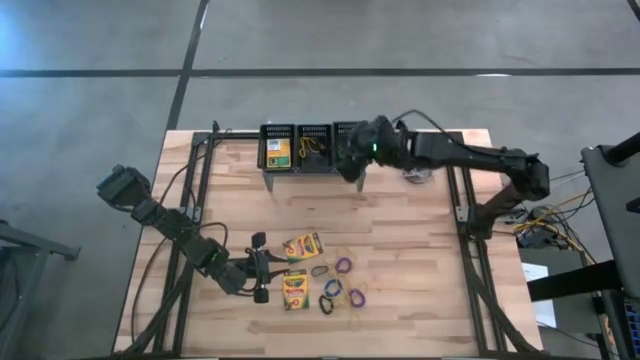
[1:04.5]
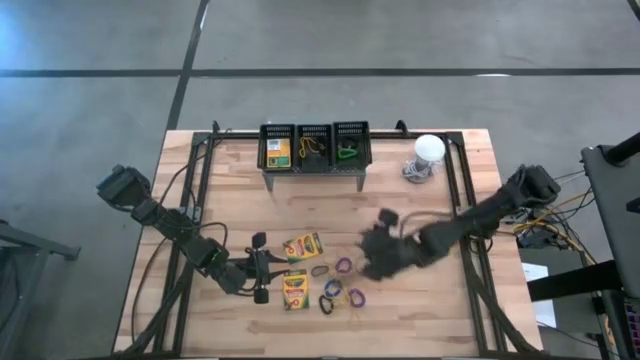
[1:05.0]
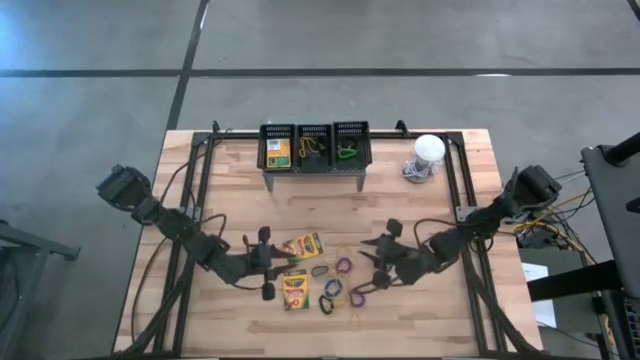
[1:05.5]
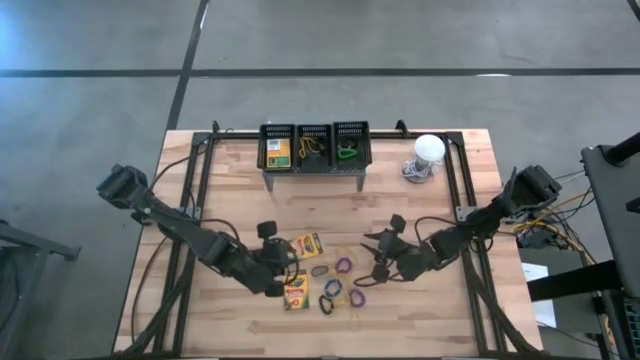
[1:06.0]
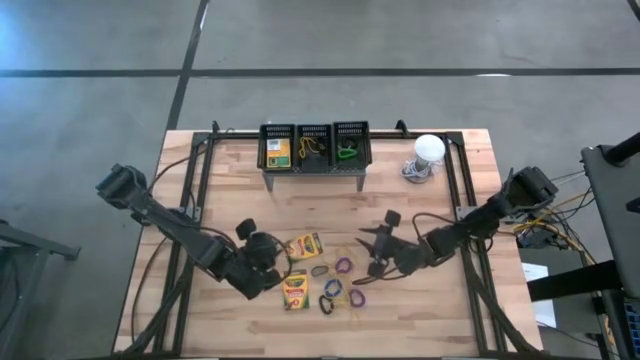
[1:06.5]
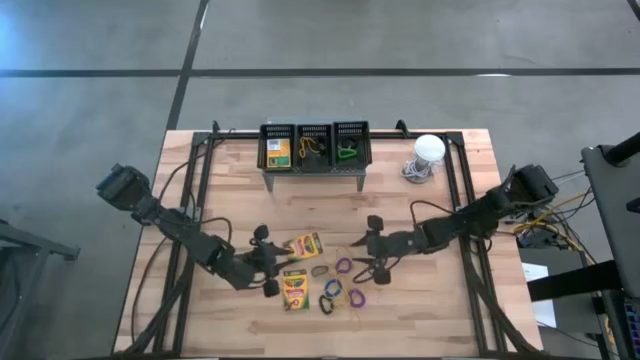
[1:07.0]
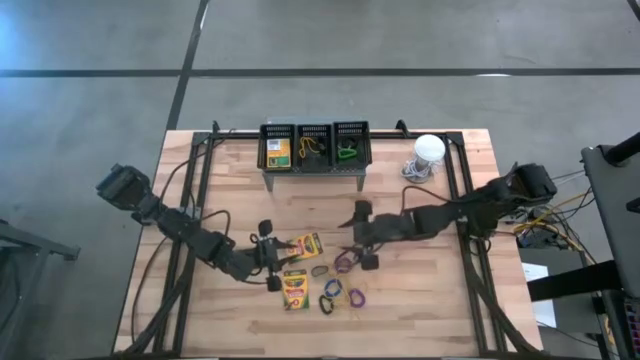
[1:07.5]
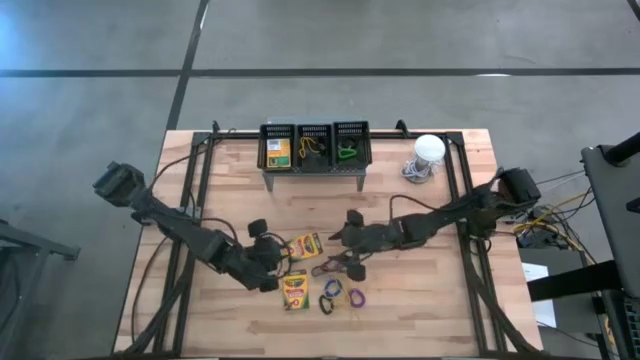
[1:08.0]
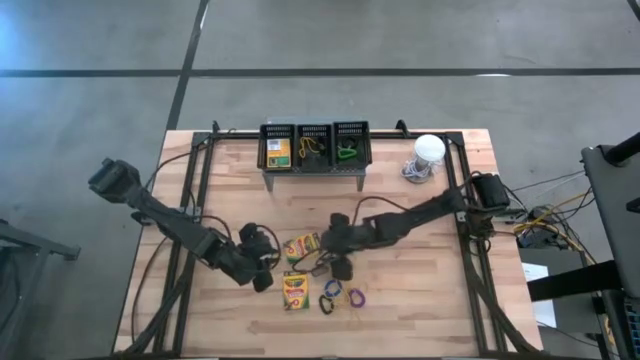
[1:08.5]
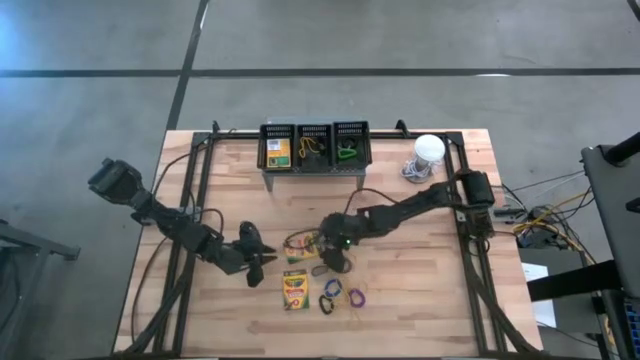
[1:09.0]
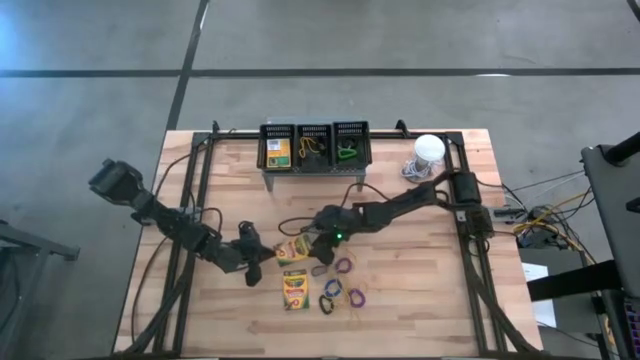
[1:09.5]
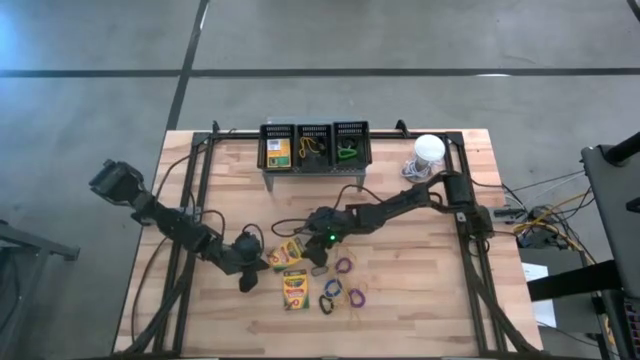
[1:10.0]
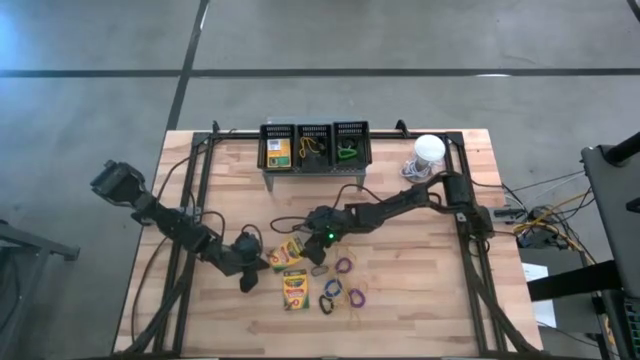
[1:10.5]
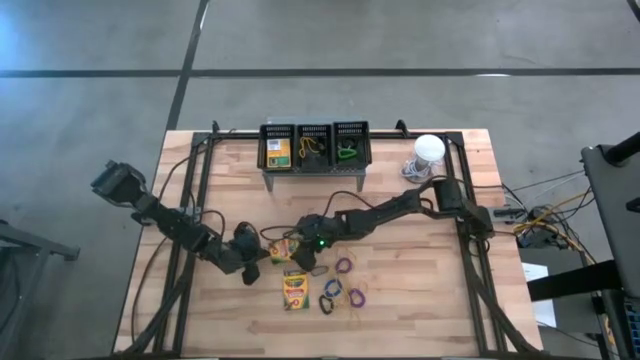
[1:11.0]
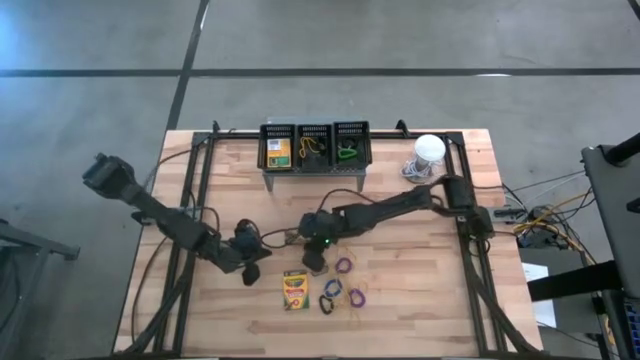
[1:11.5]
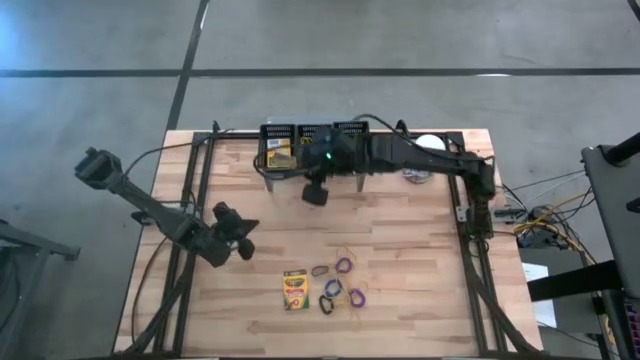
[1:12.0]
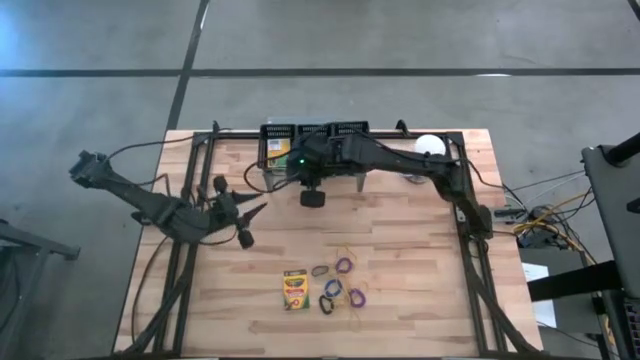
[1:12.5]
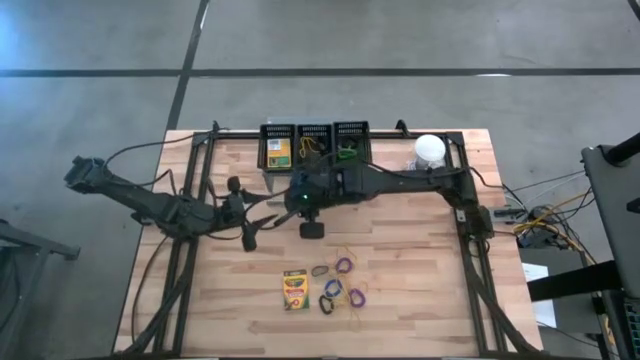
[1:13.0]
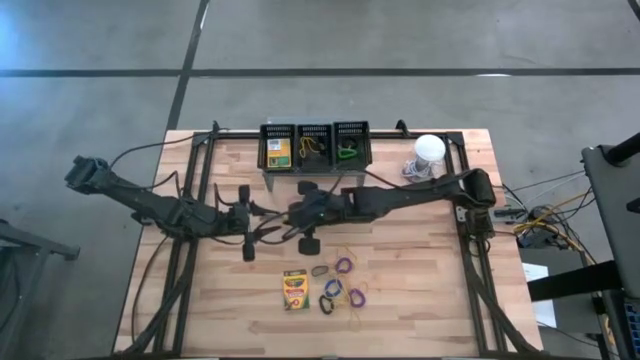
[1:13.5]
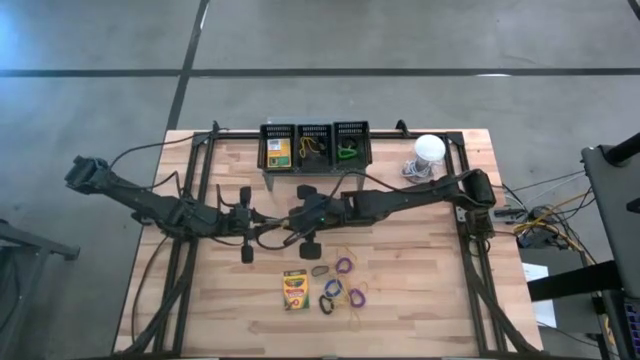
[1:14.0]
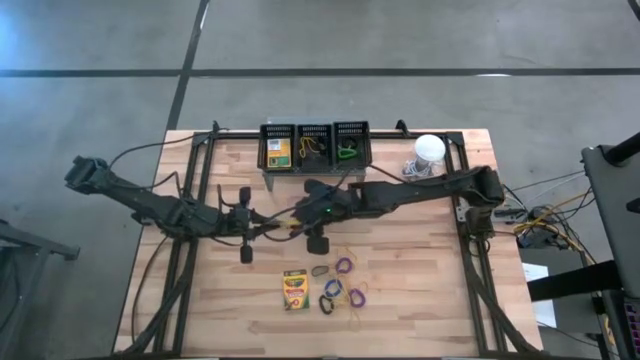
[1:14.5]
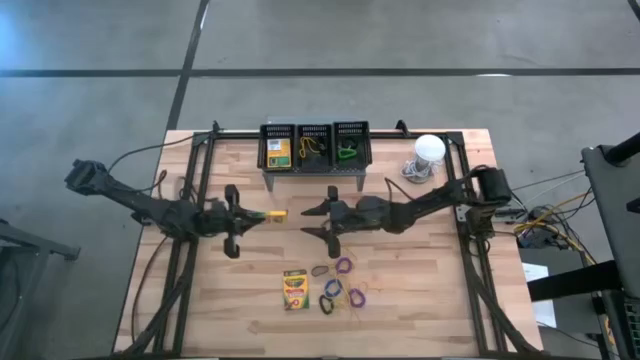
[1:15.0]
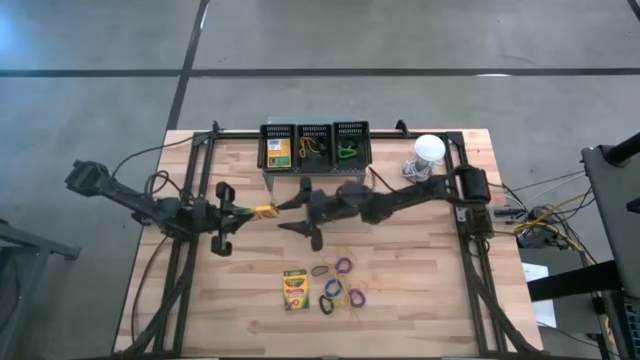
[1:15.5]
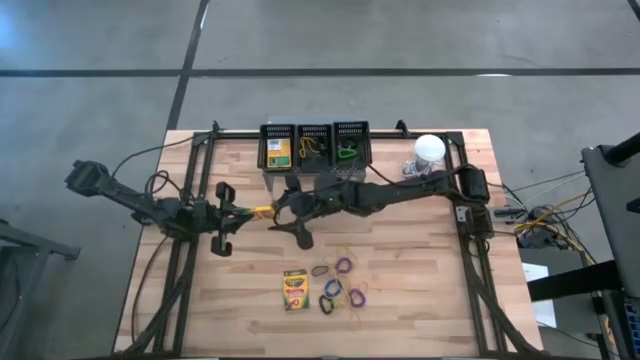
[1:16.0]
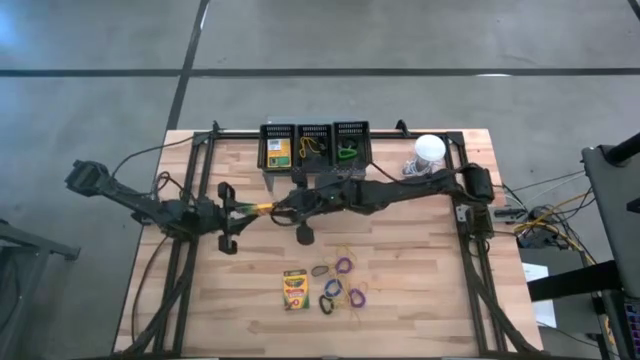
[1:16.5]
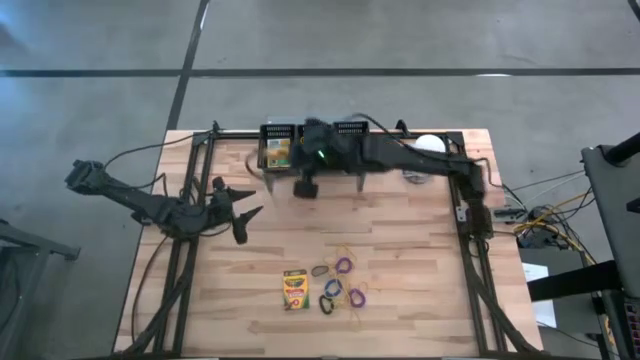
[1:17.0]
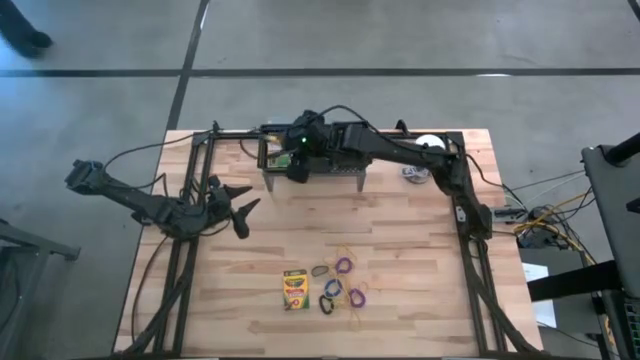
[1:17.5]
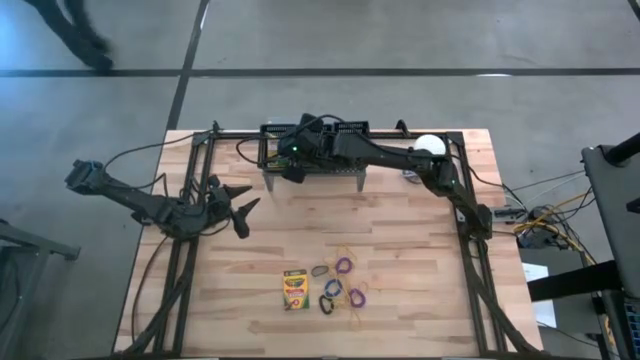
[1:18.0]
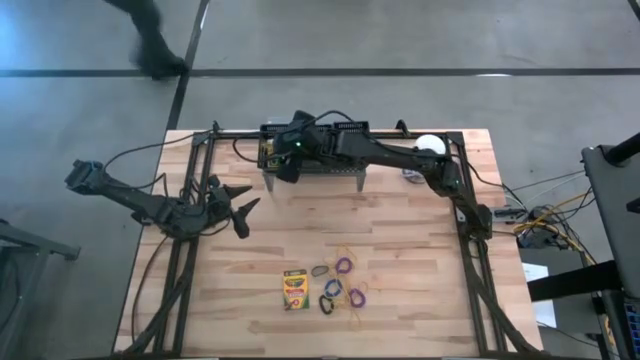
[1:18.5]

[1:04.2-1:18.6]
Task: Pick & Place Office Desk Supplies
Put the top crayon box into the left black bin

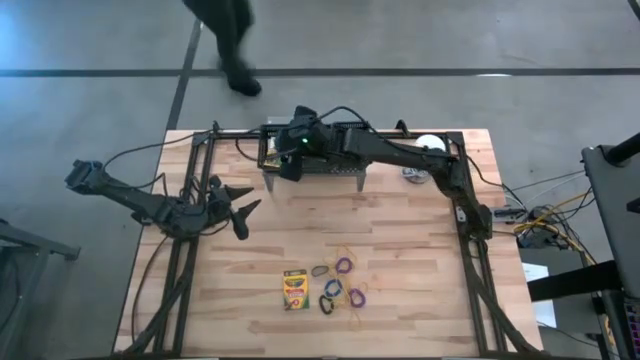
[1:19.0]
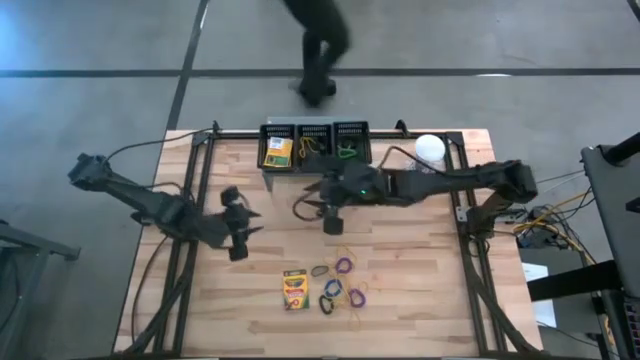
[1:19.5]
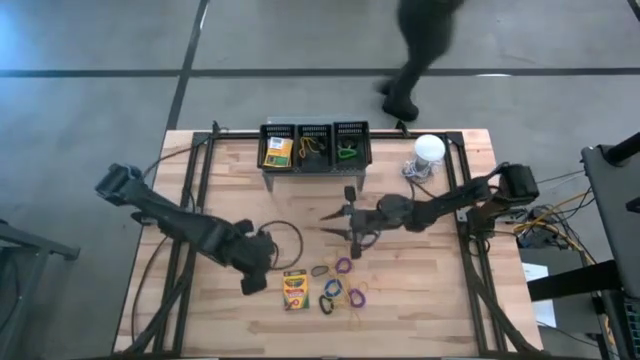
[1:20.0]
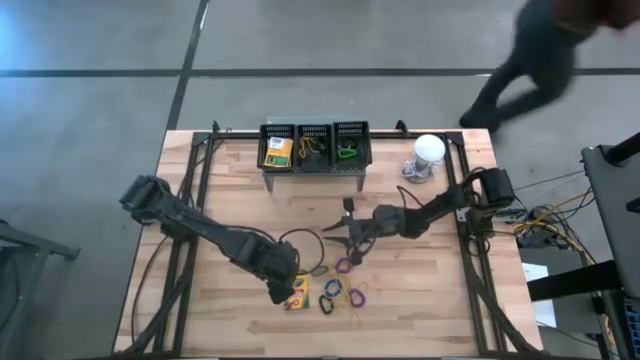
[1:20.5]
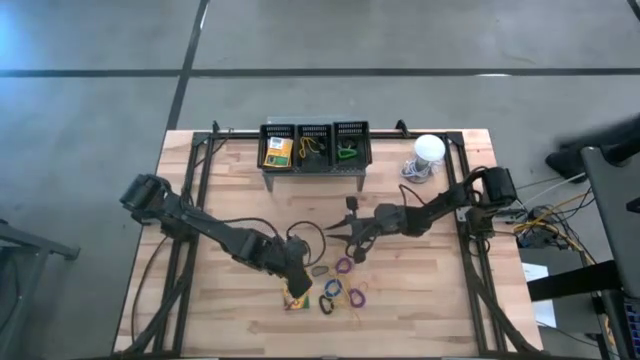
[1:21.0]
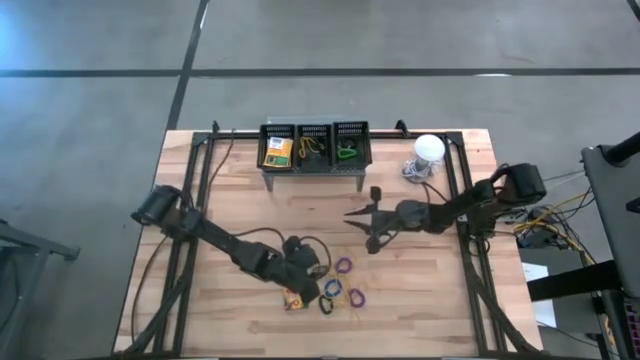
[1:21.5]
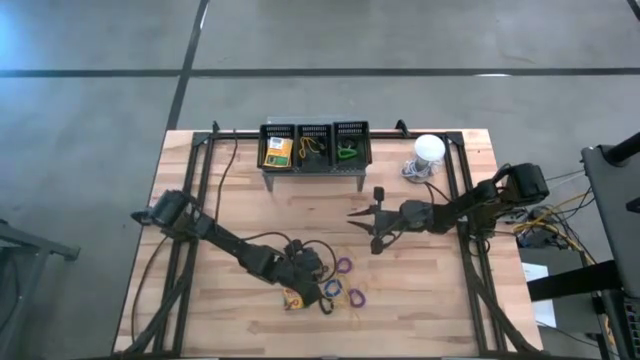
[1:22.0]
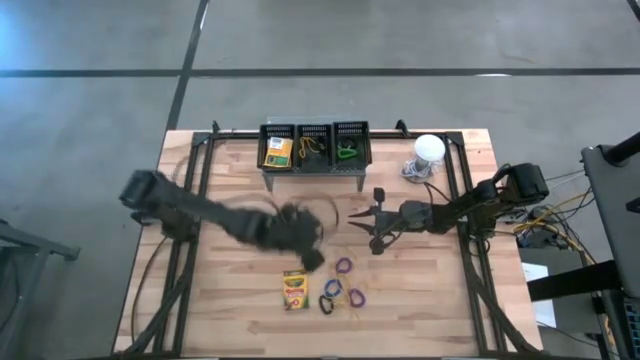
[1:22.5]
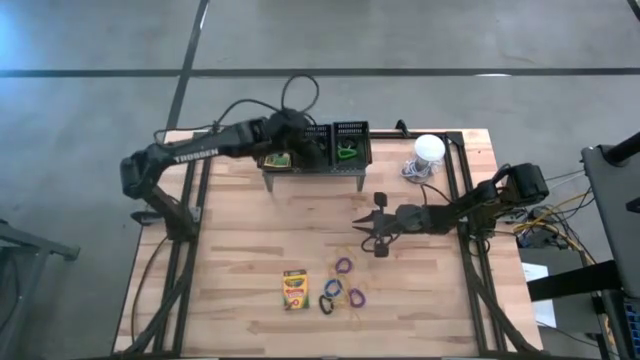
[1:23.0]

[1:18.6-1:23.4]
Put the black rubber band into the middle black bin

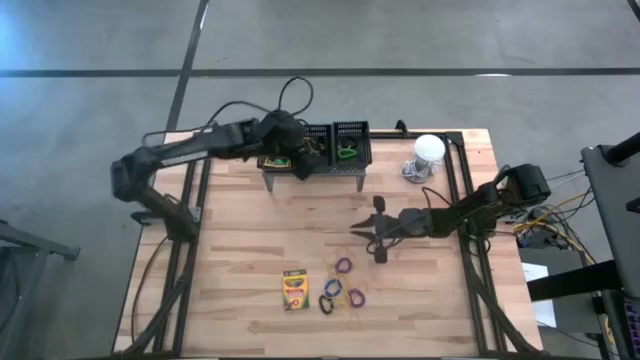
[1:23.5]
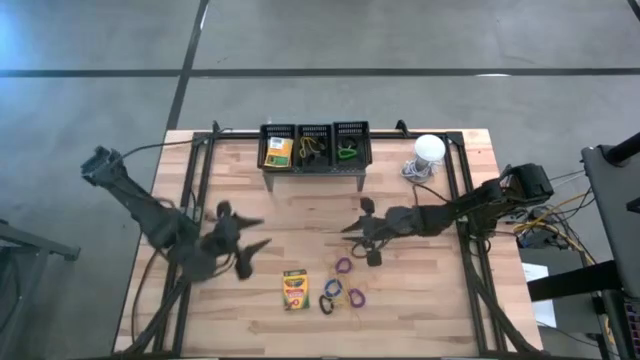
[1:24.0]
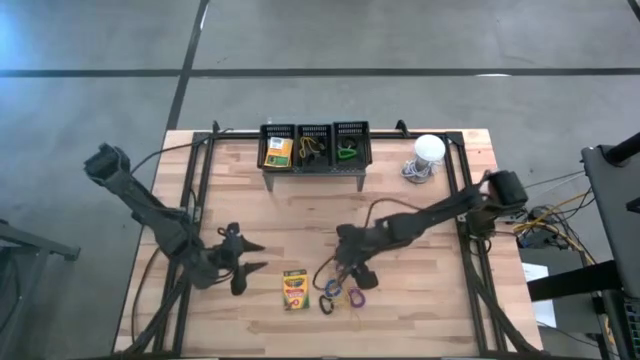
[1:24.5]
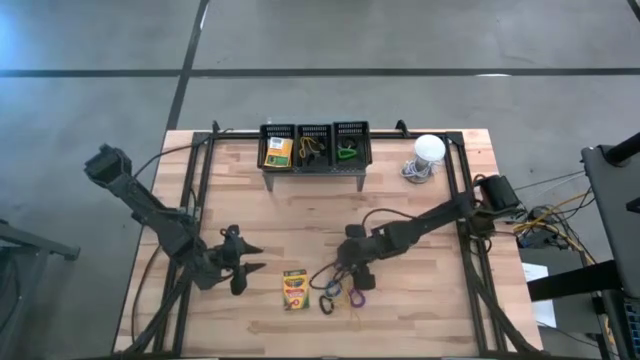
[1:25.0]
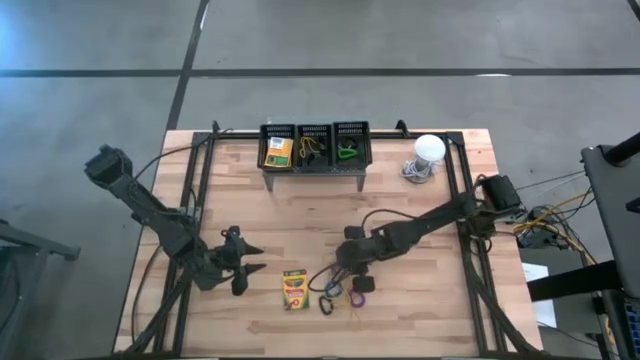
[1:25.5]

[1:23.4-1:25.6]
Put the top purple spring key chain into the right black bin

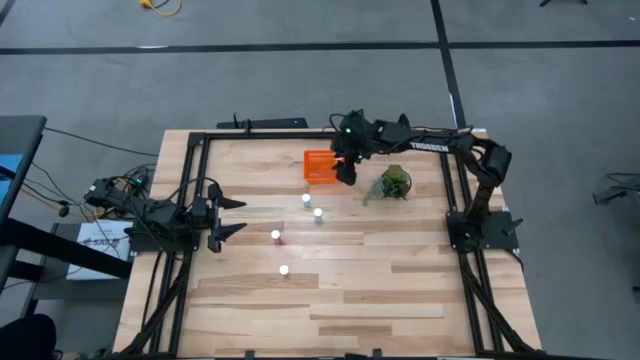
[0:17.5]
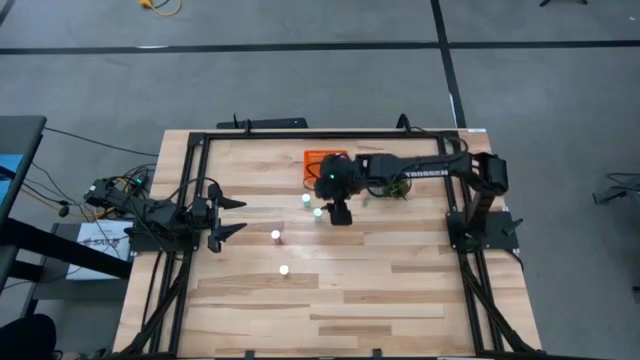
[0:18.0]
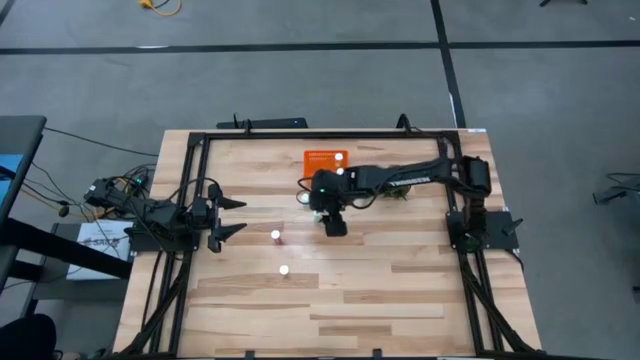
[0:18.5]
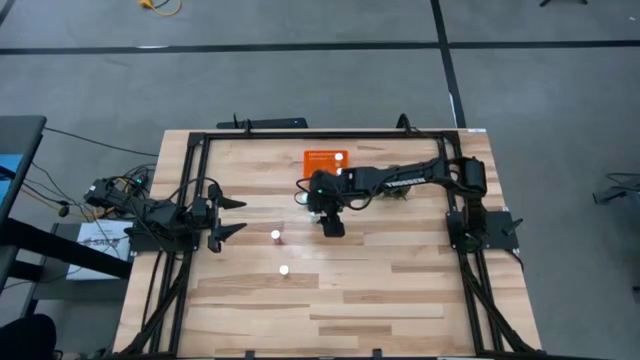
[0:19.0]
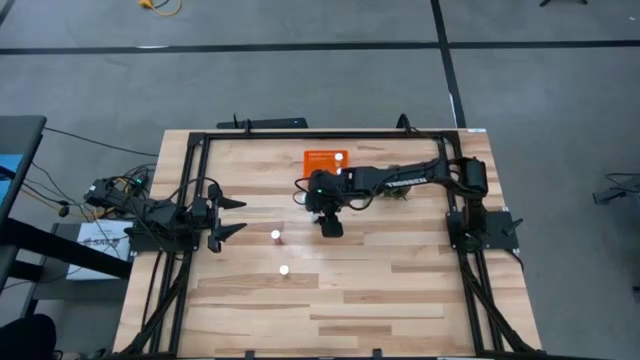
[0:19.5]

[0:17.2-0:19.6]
Task: Pick and place pill bottles into a basket
Put the bottom blue pill bottle into the orange bin
